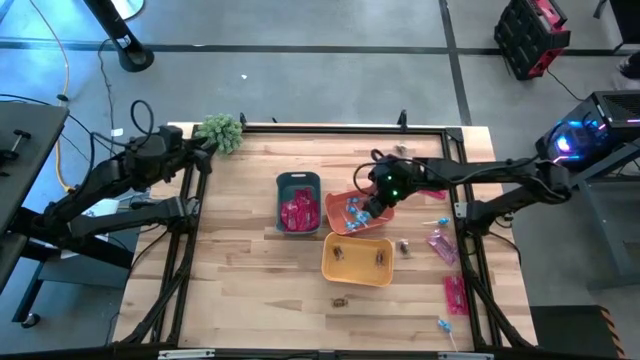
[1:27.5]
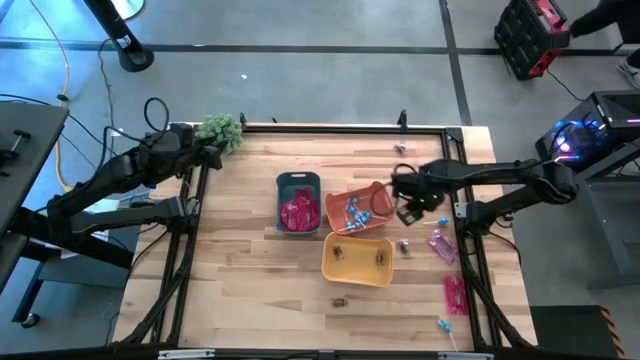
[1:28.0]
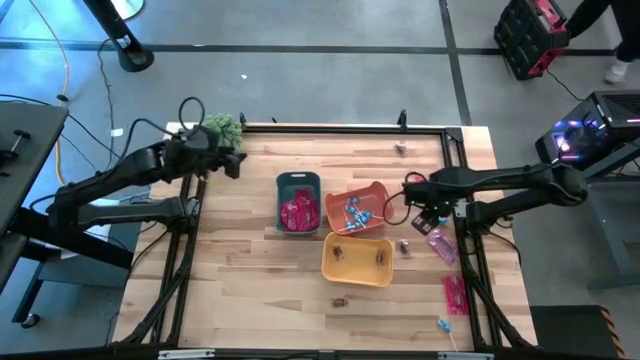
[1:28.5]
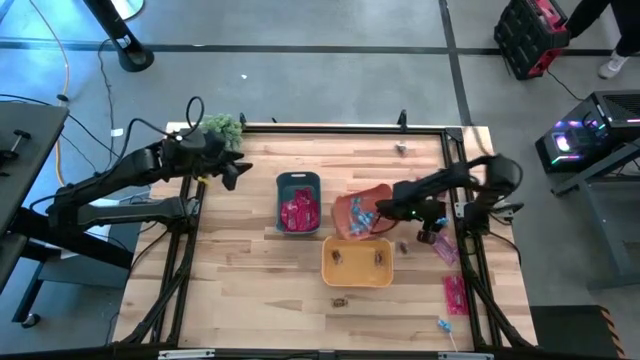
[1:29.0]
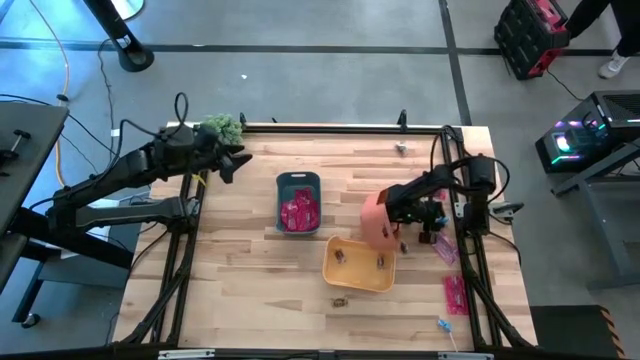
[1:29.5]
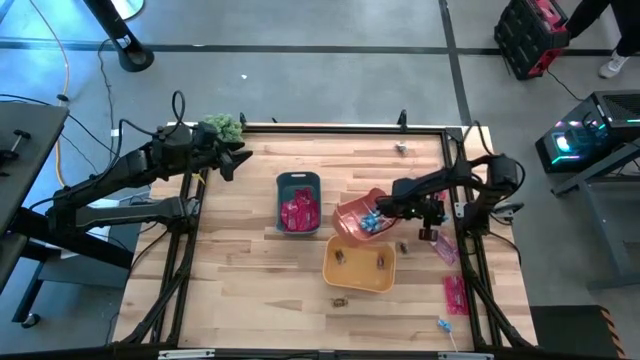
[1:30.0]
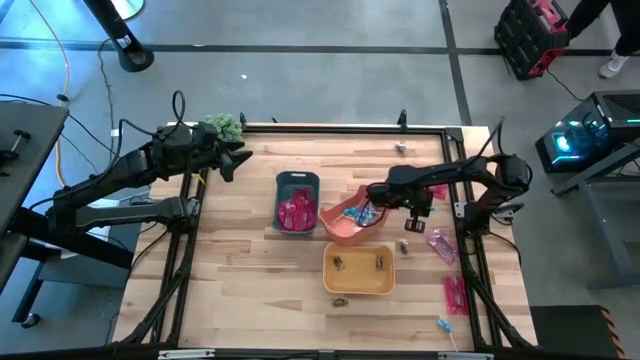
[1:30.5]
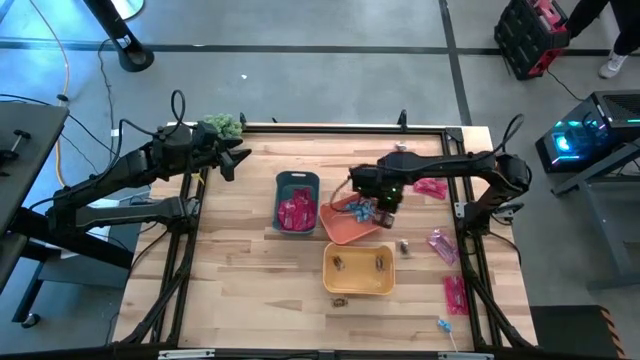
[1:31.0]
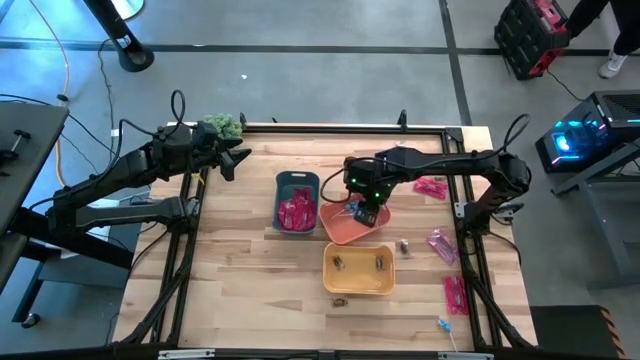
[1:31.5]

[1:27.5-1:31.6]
Task: Sort candy
Put the blue lollipop into the orange bin

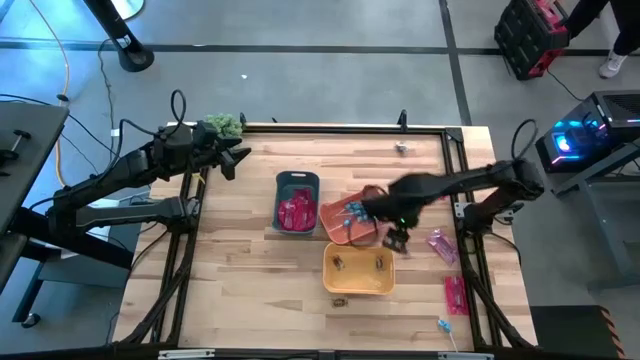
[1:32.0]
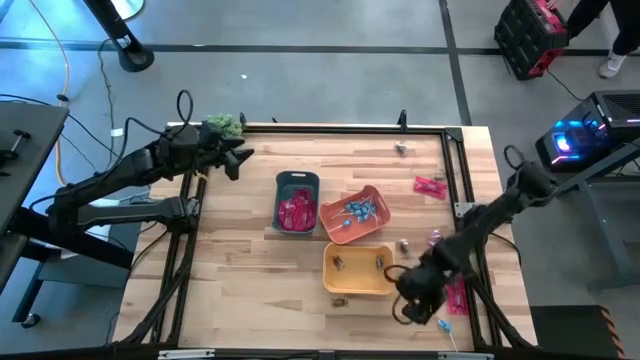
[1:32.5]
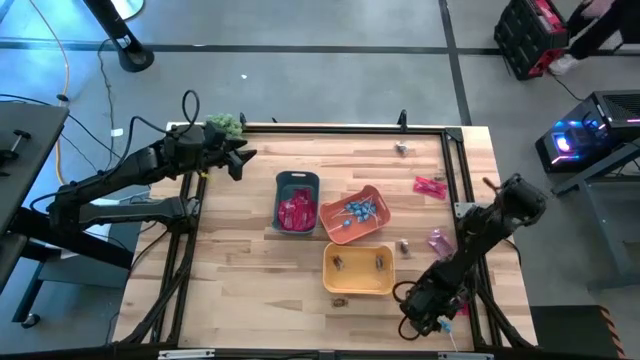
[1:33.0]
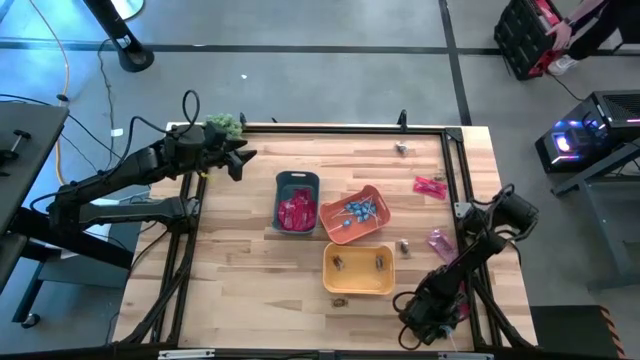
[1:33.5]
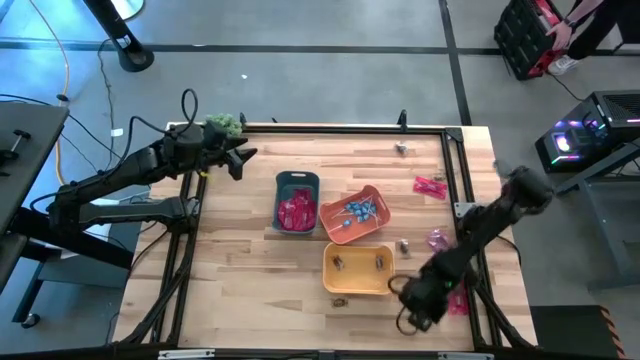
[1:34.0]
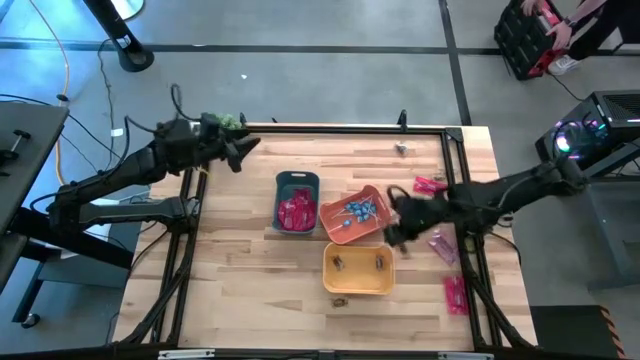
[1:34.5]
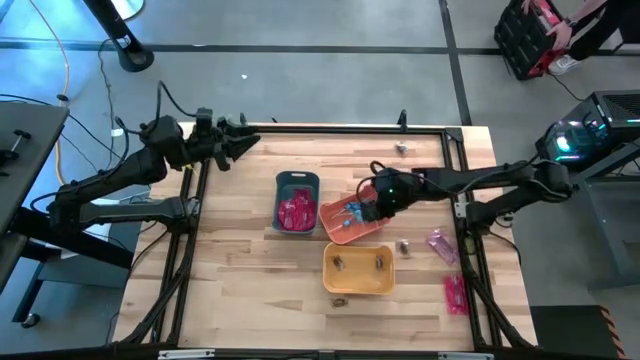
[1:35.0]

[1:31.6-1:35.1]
Put the blue lollipop into the orange bin

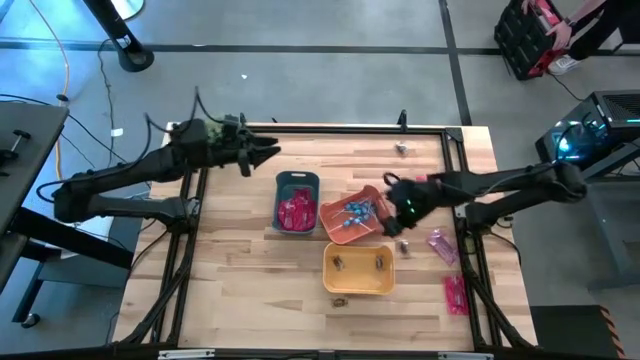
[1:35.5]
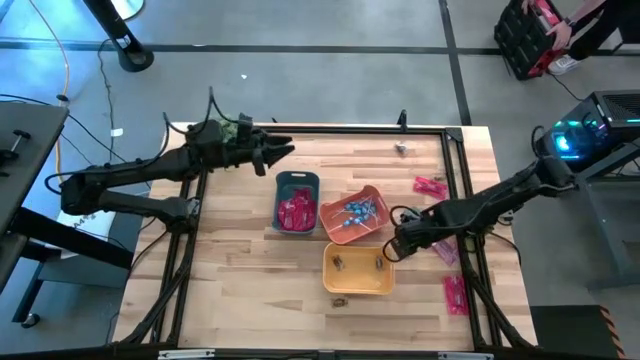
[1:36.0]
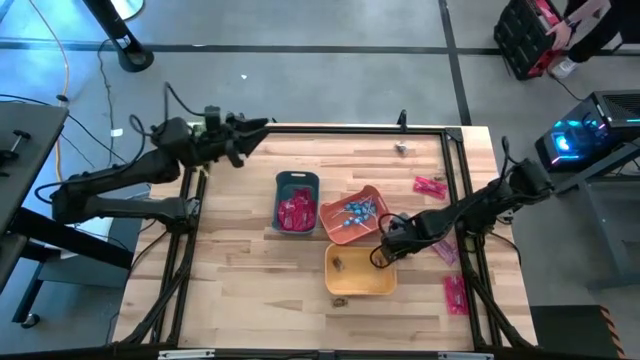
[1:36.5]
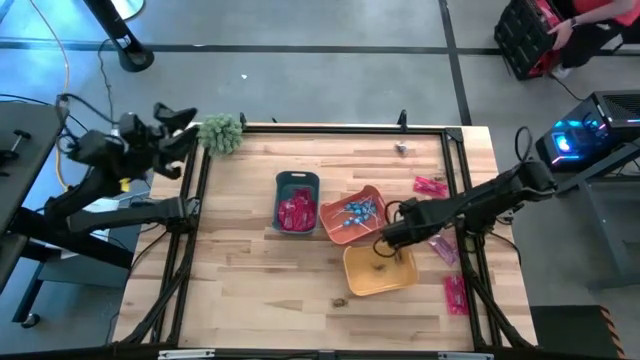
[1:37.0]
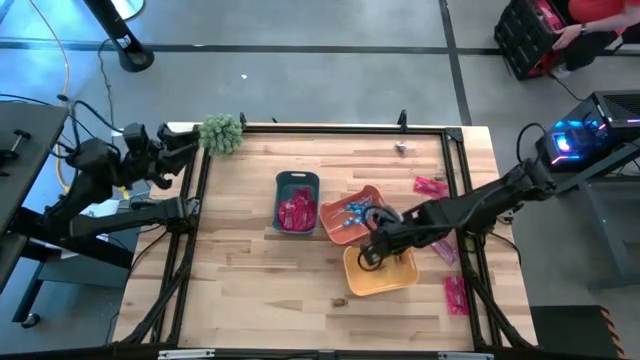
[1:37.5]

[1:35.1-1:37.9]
Put the yellow candy into the yellow bin

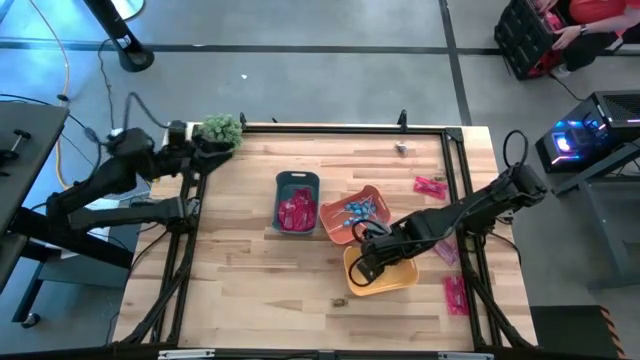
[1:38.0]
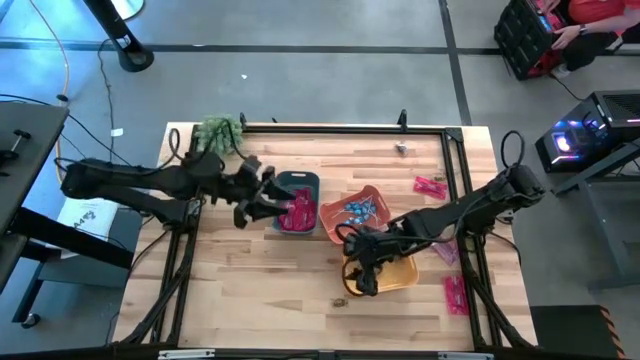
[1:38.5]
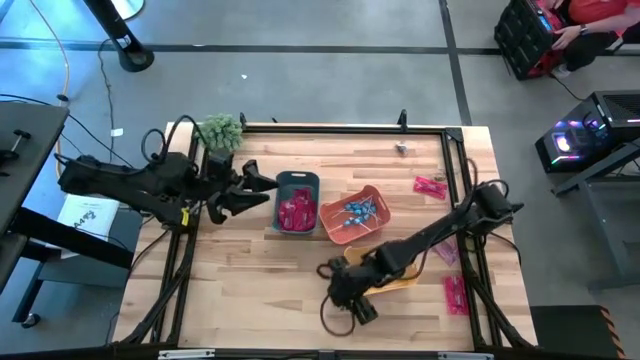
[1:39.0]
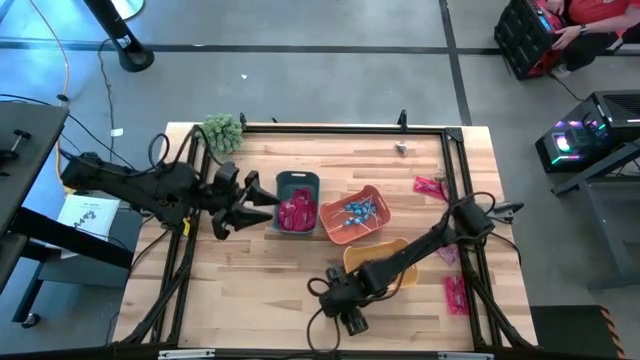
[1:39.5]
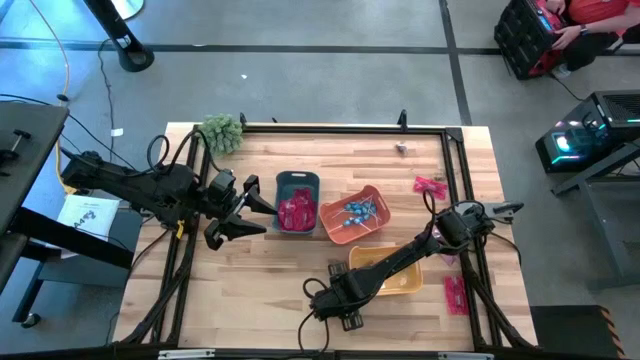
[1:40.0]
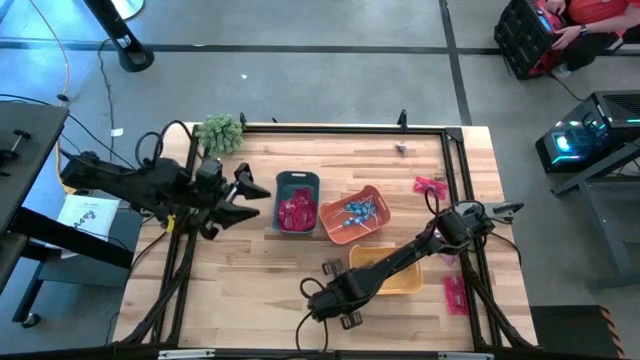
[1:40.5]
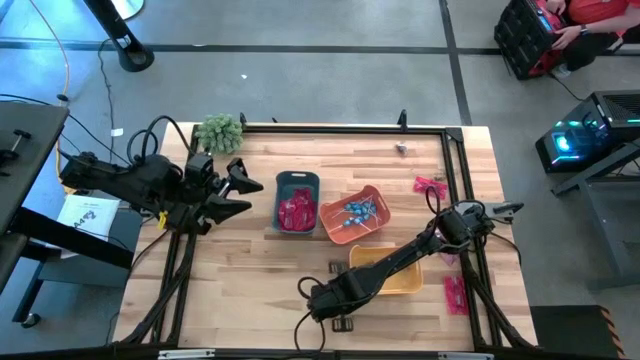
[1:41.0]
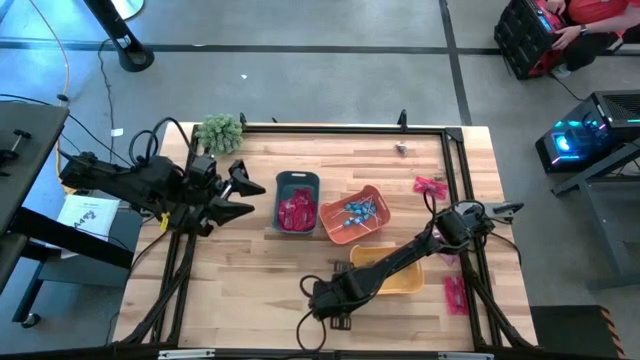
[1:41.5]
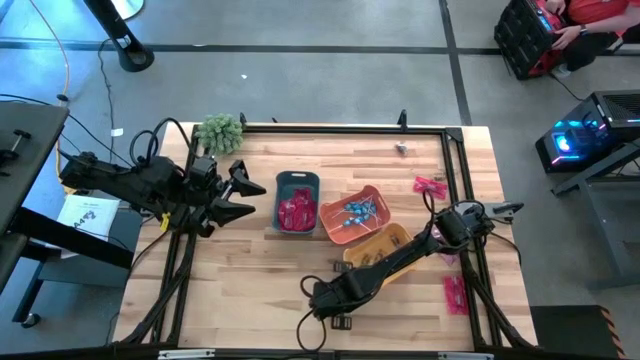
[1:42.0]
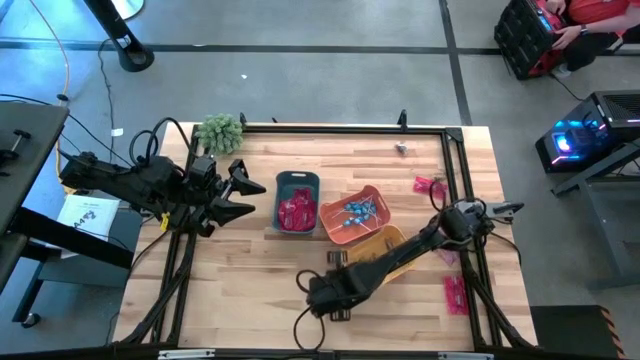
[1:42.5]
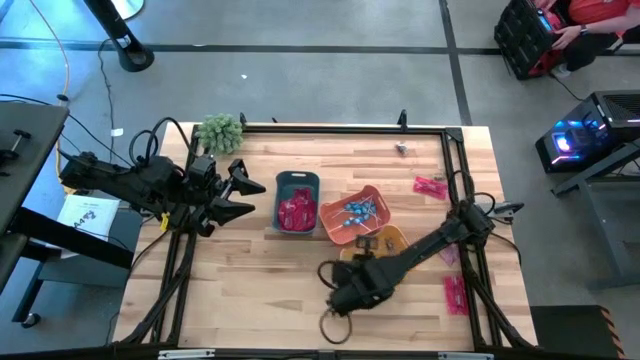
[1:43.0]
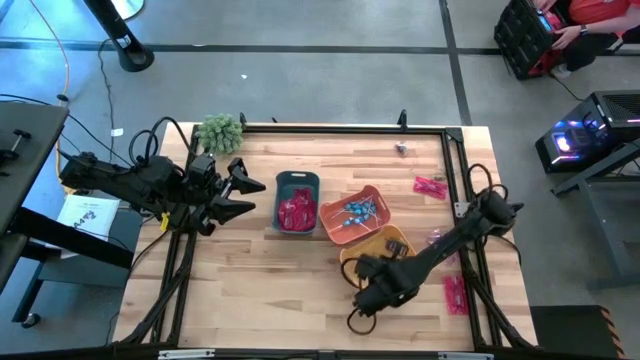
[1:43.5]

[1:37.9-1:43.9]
Put the bottom yellow candy into the yellow bin

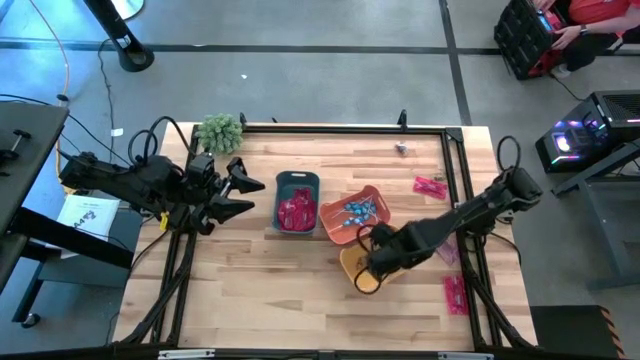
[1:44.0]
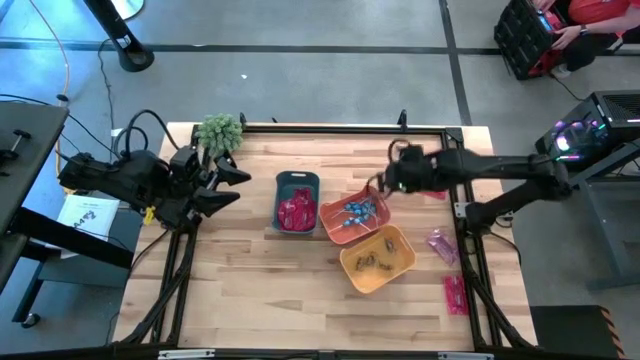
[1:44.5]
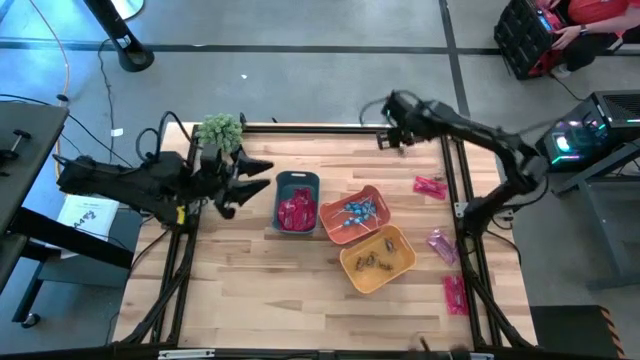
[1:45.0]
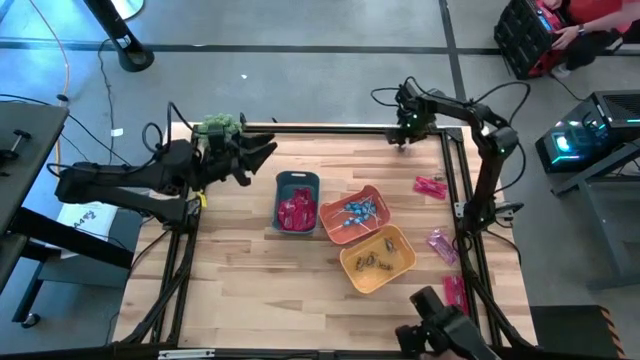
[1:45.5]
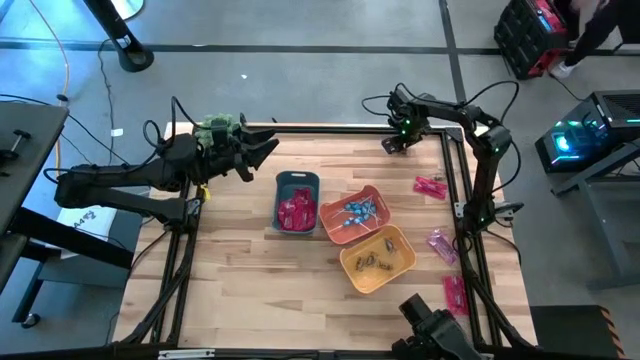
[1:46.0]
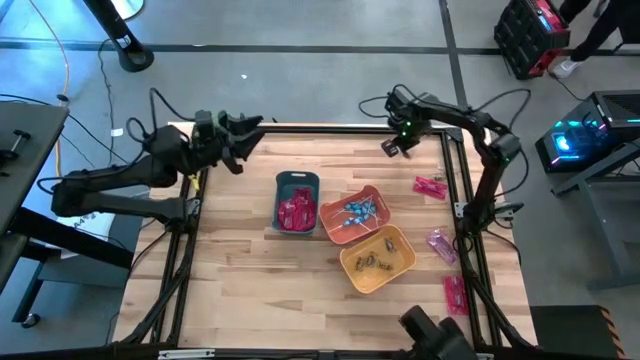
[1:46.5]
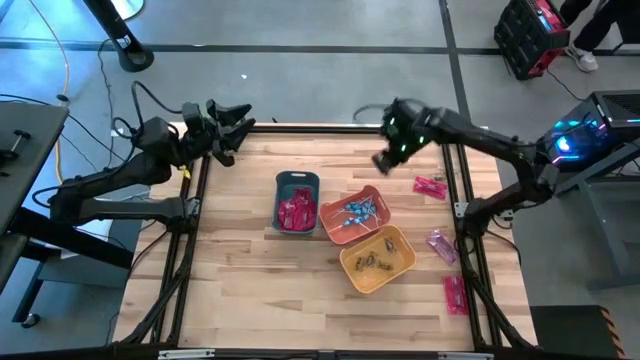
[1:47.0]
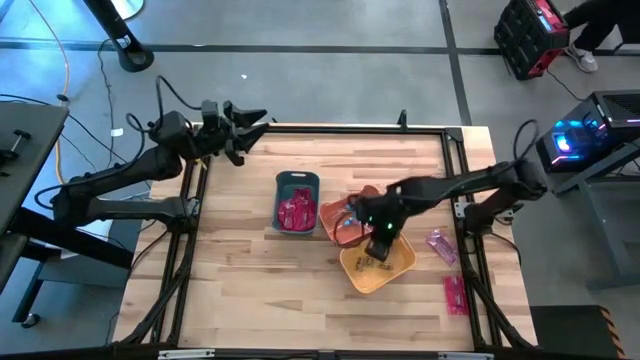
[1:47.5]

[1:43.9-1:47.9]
Put the yellow candy into the yellow bin

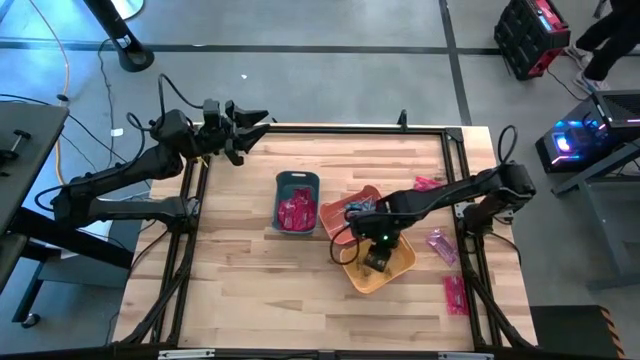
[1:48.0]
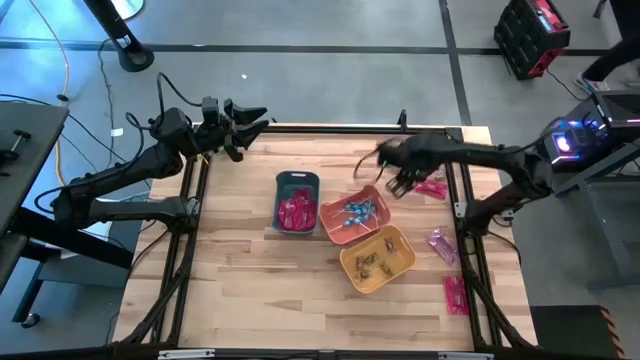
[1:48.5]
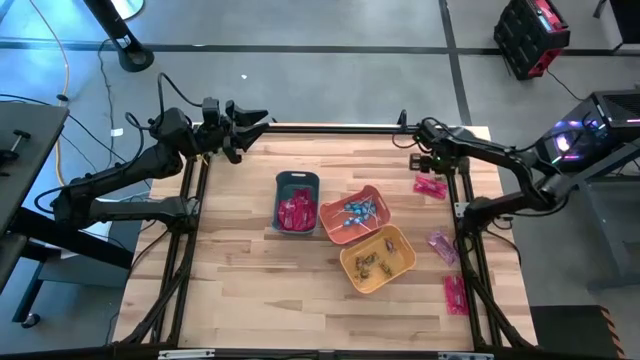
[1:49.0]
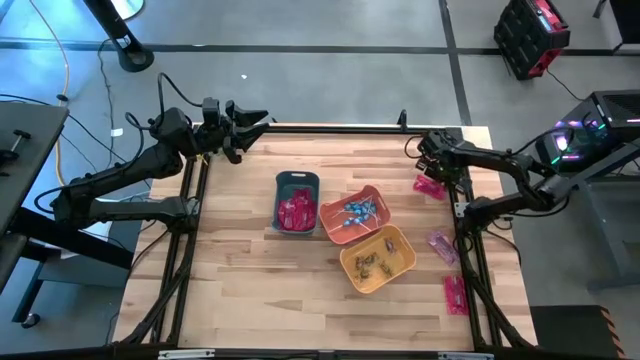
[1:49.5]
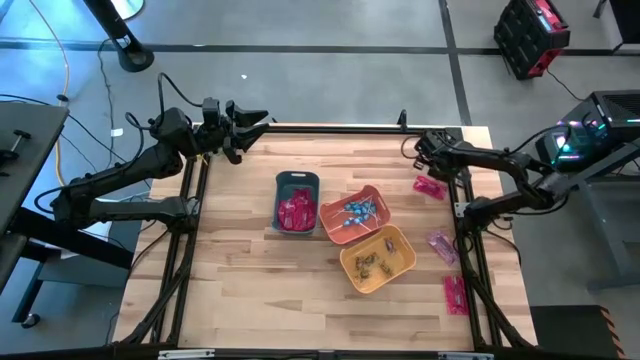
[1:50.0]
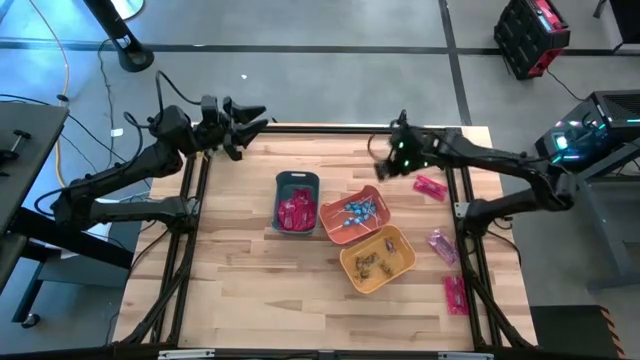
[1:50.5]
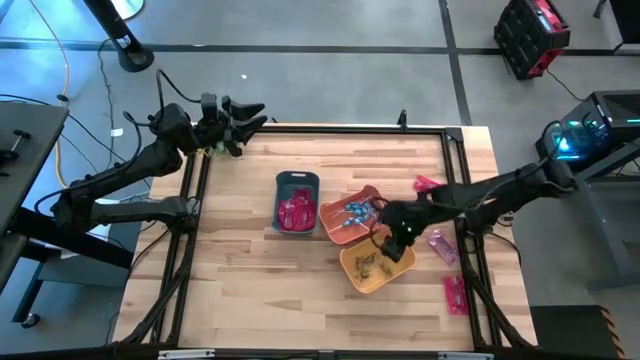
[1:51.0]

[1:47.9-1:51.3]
Put the yellow candy into the yellow bin
